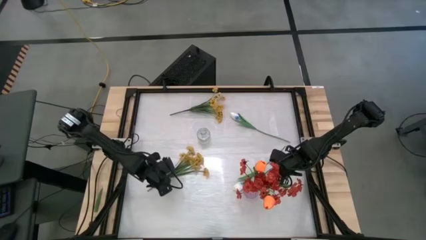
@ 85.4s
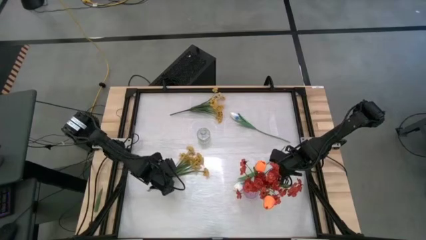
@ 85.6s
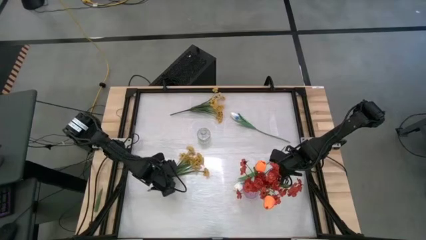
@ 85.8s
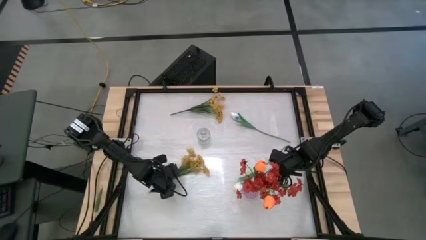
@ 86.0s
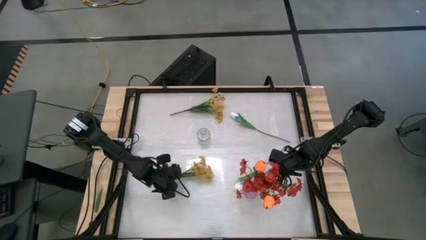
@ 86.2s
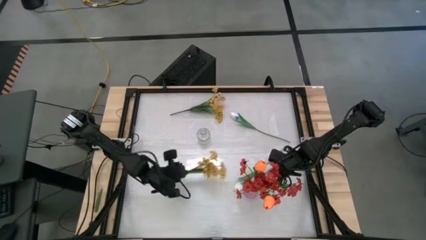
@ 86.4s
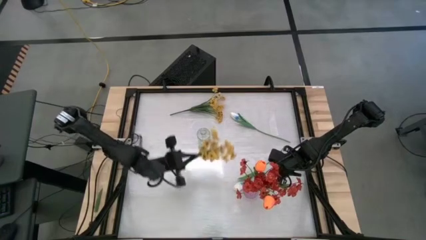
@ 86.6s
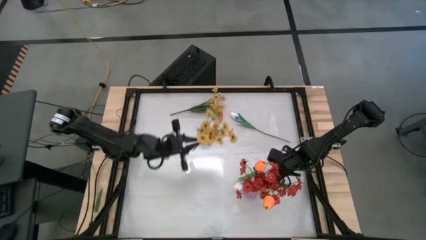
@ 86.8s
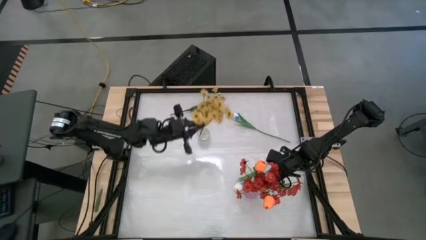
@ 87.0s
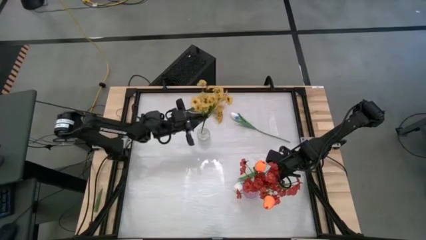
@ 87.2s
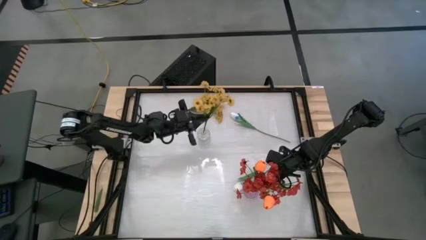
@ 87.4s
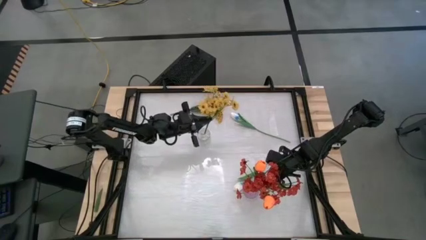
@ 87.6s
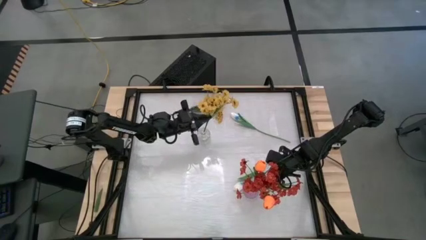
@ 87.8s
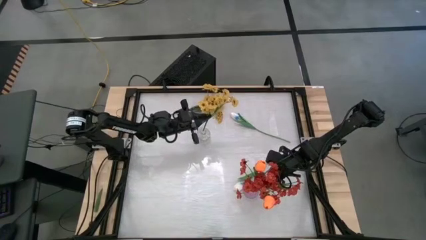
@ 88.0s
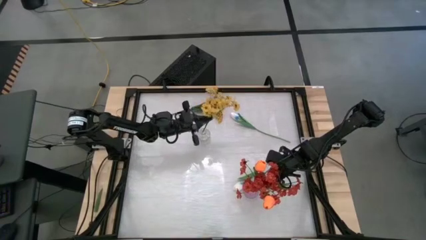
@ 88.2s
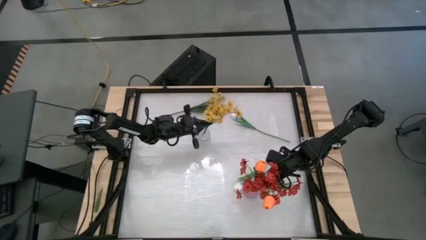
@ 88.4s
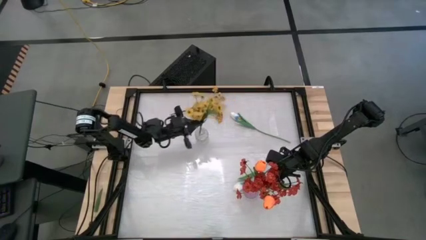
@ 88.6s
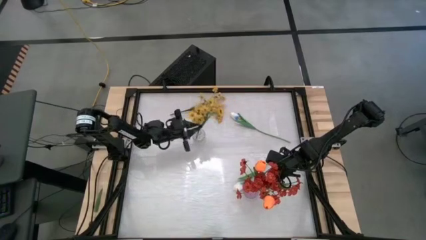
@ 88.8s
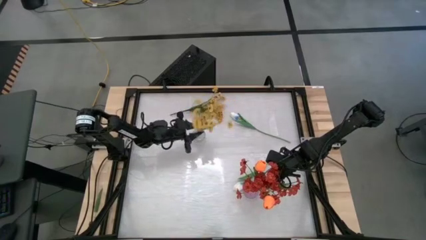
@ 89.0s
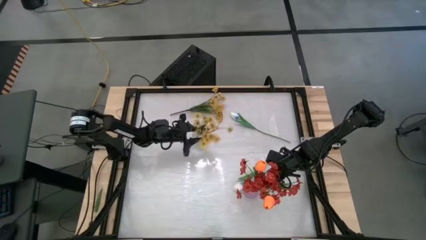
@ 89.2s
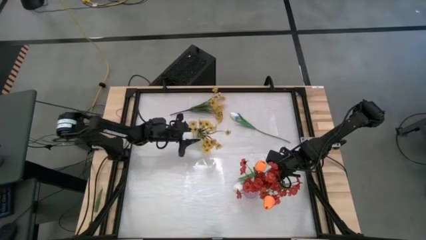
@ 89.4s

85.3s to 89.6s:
Task: Sort flowers into vase by color
Put the bottom yellow flowers into the transparent vase

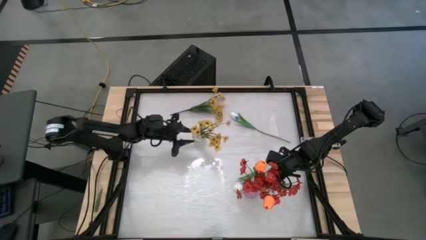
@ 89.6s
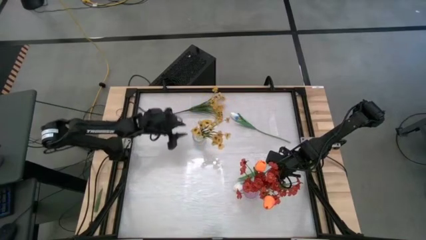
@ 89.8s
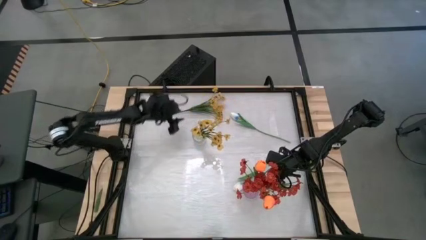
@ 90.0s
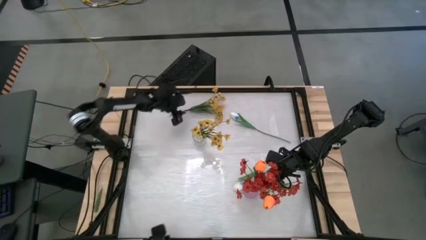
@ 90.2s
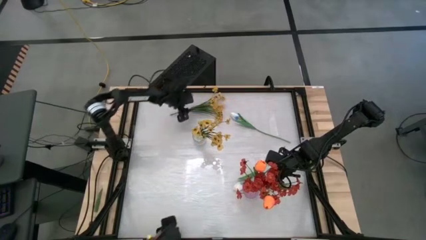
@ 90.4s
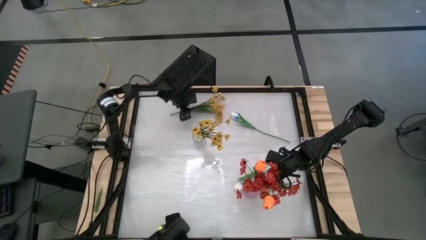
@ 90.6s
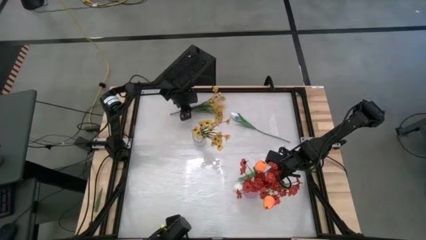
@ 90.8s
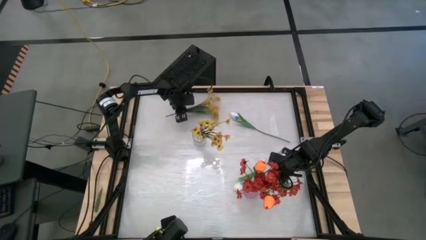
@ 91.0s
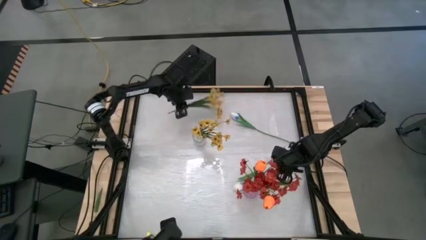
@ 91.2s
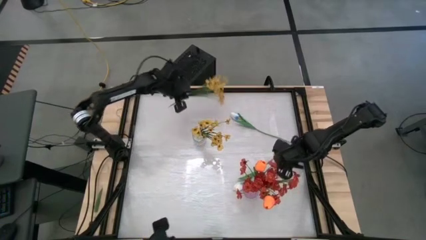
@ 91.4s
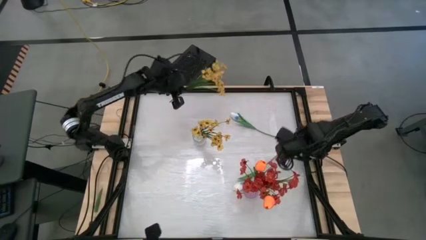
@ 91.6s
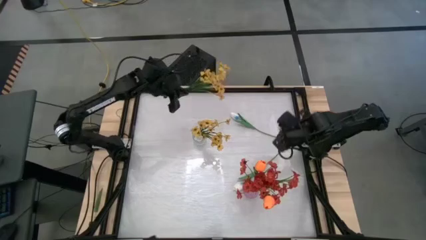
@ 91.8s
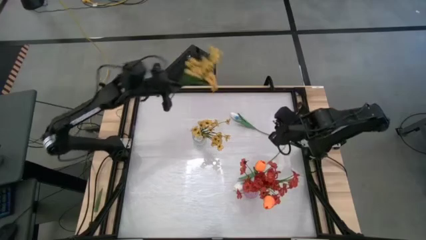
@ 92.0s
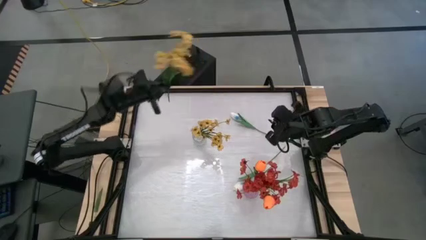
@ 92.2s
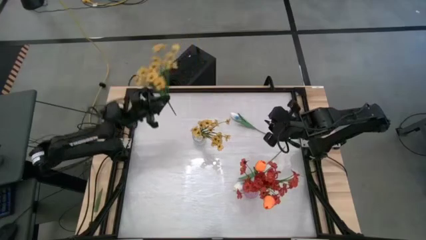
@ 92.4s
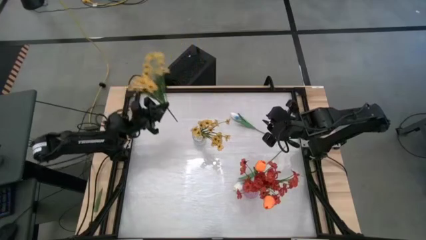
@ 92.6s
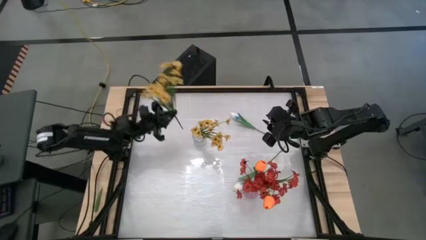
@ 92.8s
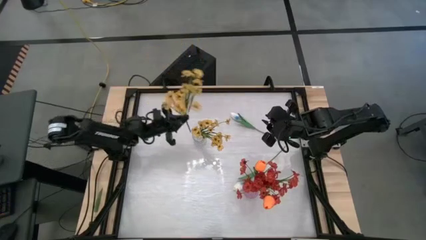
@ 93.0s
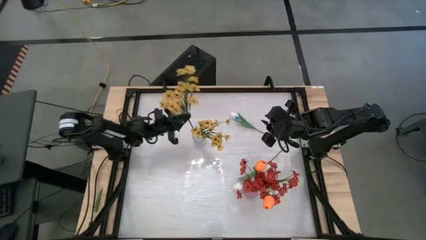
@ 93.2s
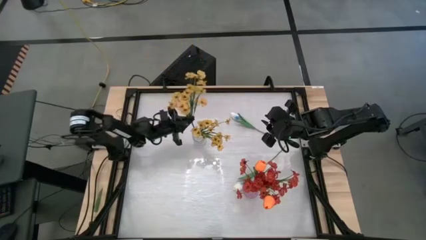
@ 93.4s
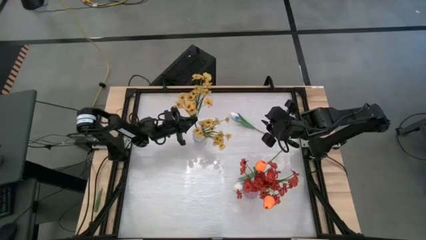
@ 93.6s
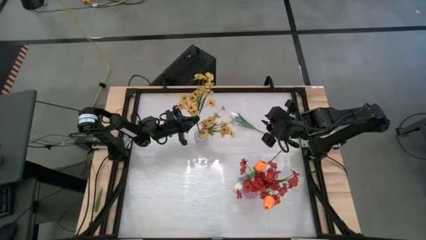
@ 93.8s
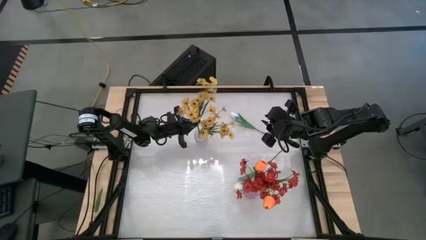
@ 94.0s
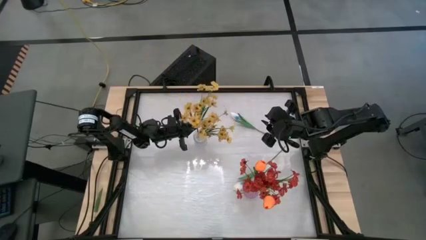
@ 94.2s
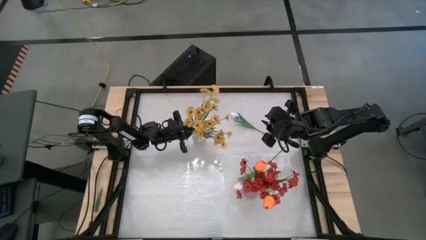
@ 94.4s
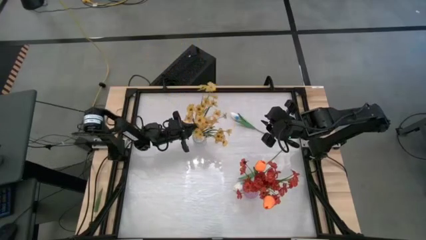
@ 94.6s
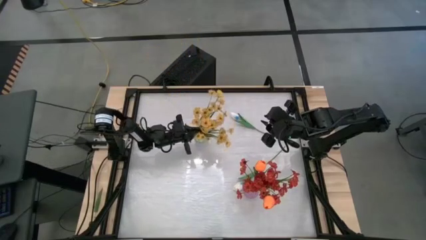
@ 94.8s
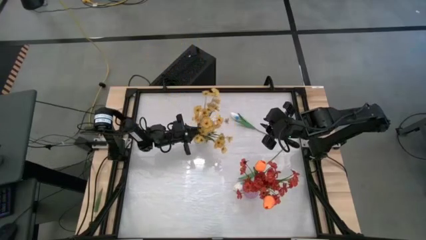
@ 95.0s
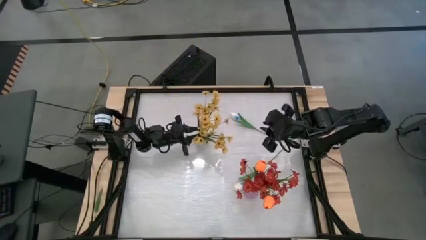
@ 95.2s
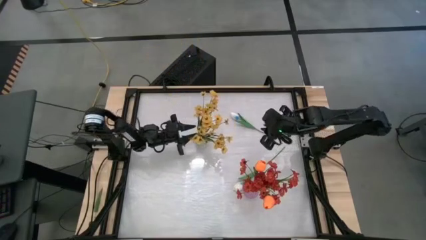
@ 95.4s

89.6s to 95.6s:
Put the yellow flowers into the transparent vase

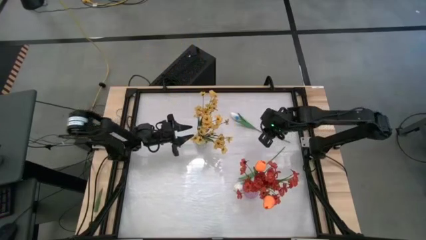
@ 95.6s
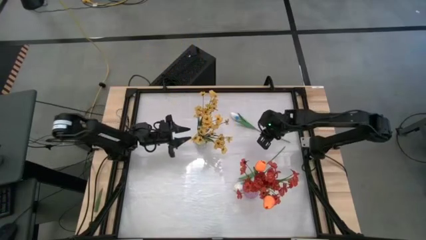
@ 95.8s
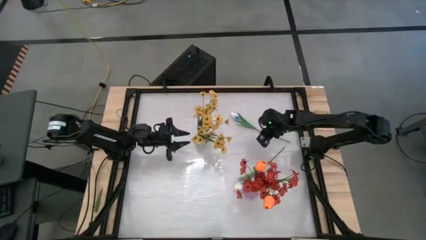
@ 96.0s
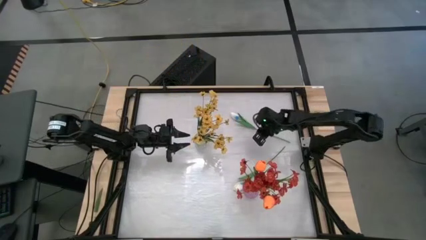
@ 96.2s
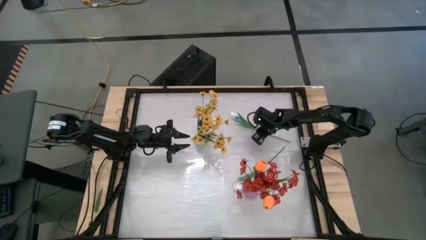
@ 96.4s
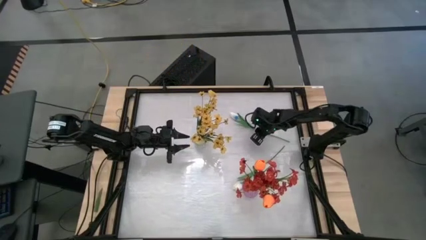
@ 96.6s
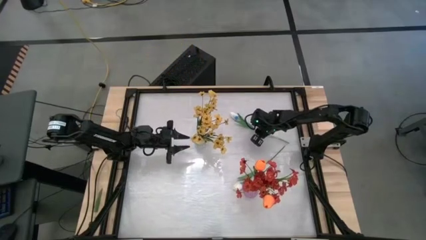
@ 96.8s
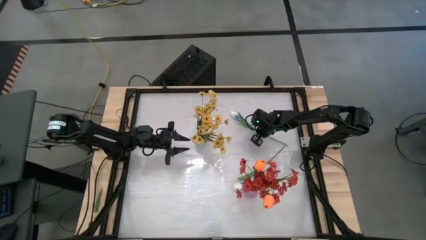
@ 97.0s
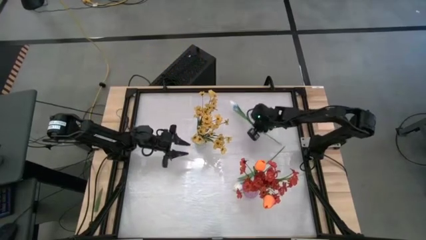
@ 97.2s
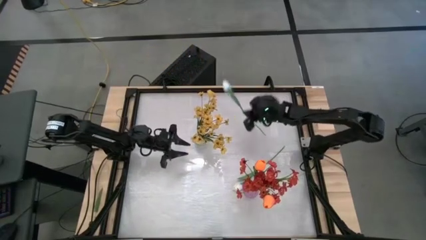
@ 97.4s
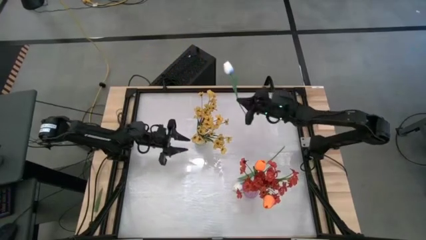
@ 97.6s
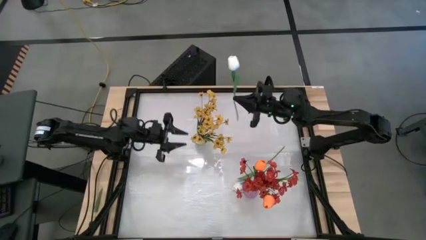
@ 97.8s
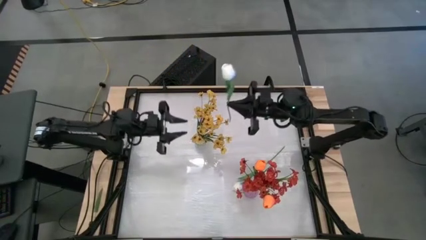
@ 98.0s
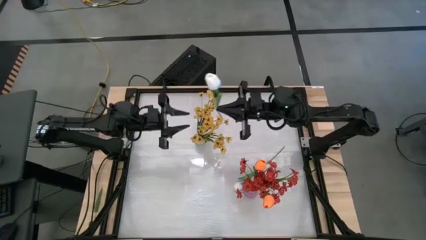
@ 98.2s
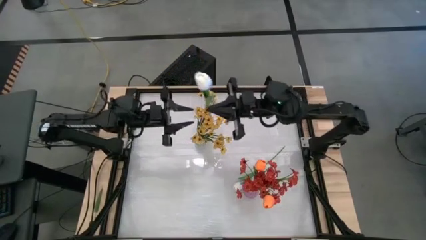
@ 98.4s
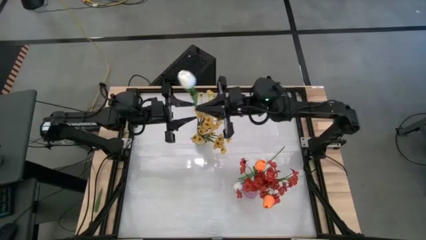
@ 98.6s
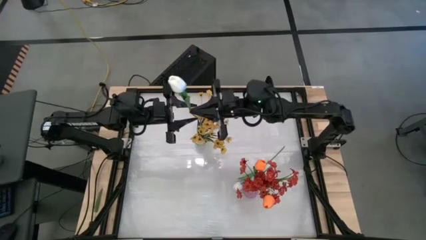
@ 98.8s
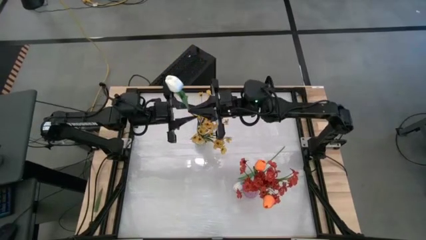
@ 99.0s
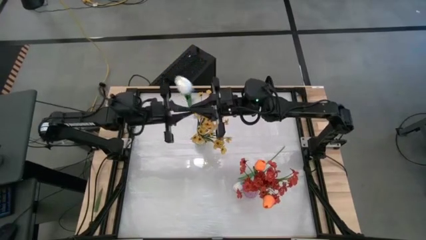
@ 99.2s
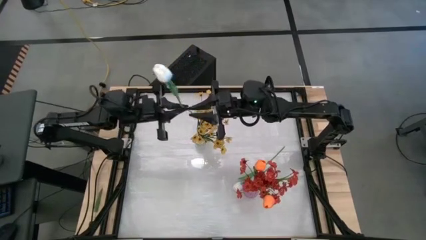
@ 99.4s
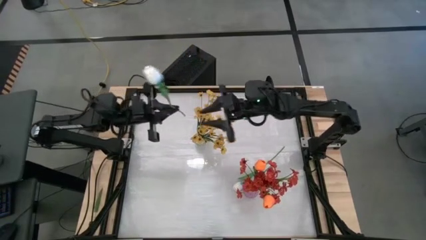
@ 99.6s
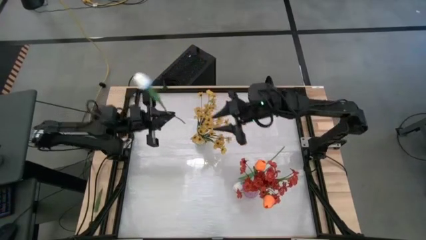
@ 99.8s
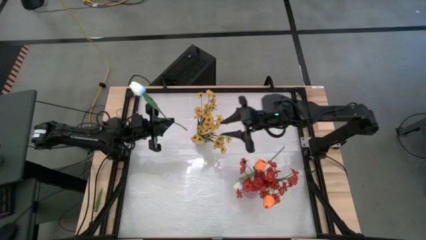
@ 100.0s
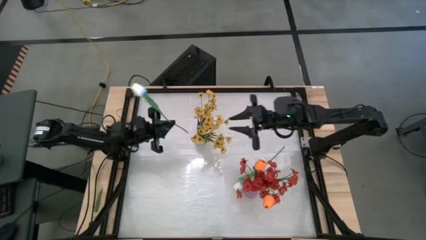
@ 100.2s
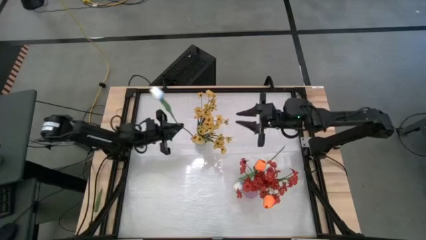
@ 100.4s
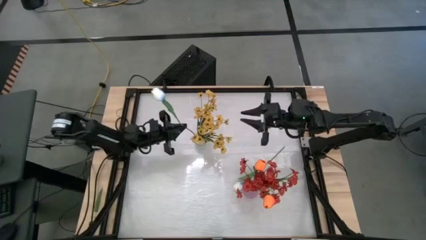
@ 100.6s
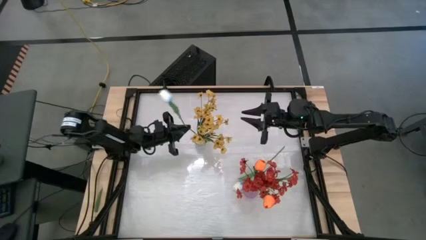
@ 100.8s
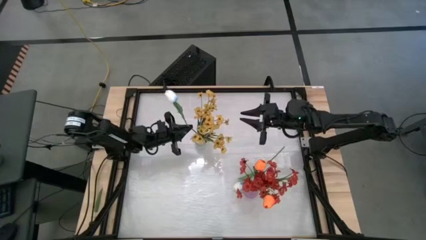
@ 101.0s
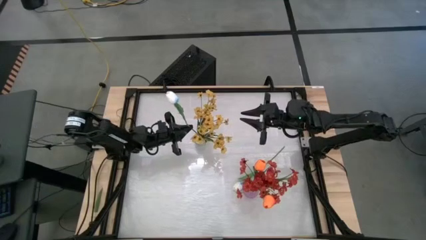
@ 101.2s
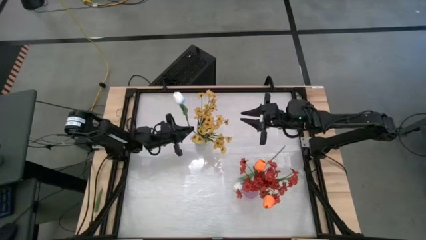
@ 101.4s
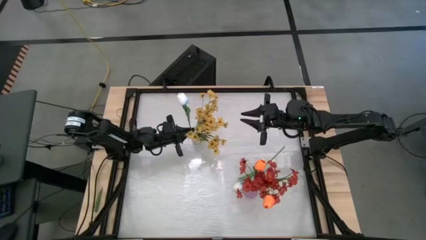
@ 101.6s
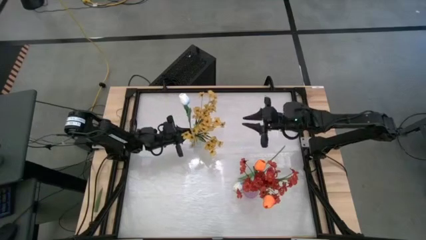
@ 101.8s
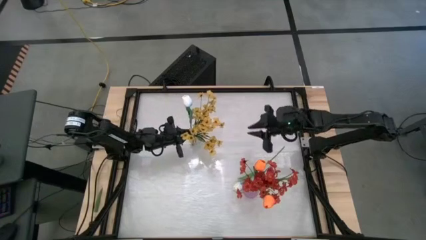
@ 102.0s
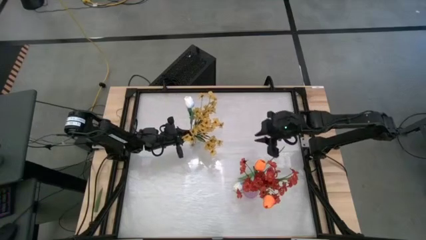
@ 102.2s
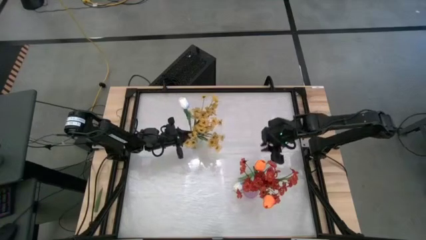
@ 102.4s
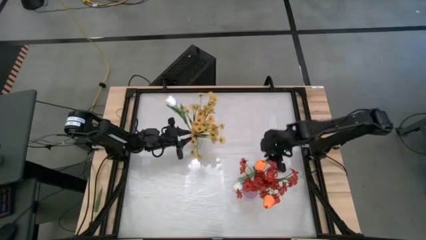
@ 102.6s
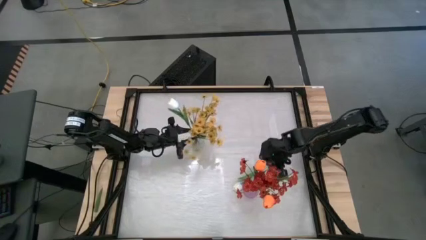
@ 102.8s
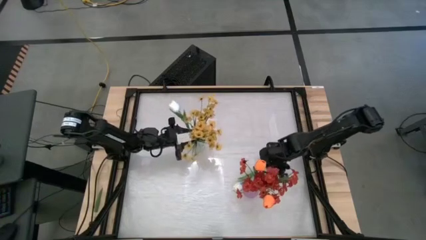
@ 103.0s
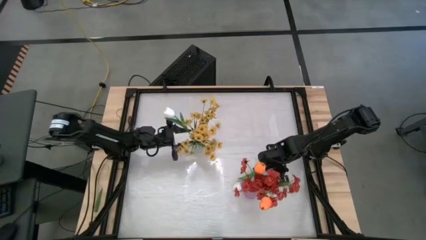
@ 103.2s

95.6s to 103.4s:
Put the top white flower into the transparent vase
